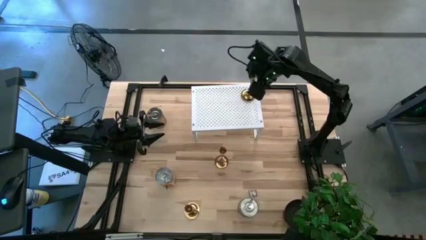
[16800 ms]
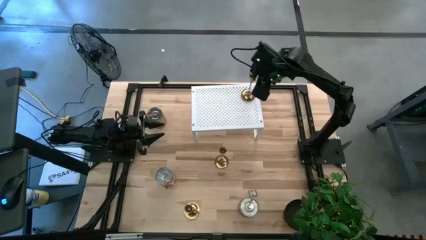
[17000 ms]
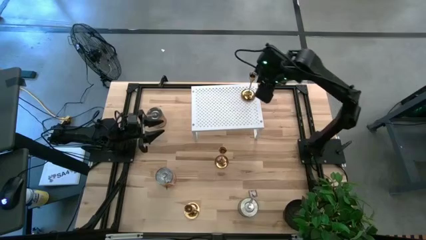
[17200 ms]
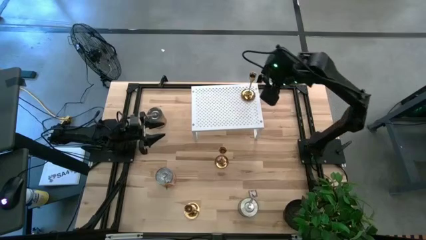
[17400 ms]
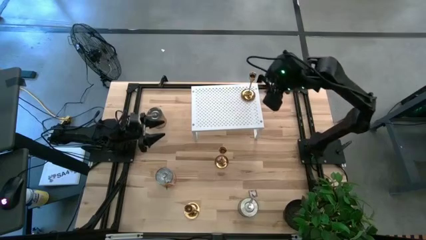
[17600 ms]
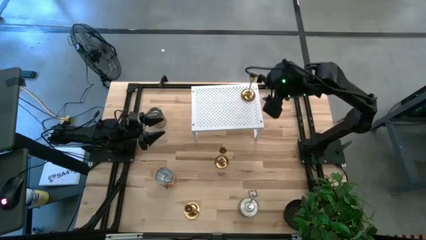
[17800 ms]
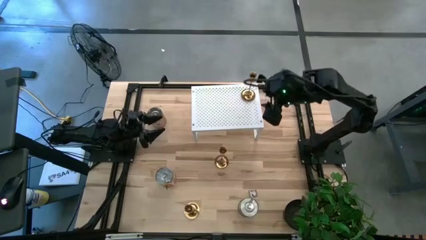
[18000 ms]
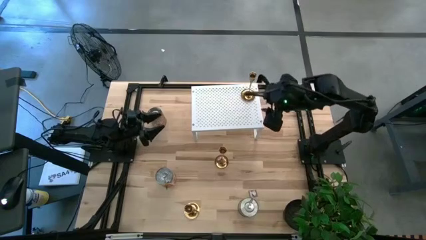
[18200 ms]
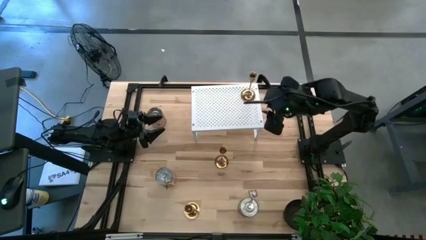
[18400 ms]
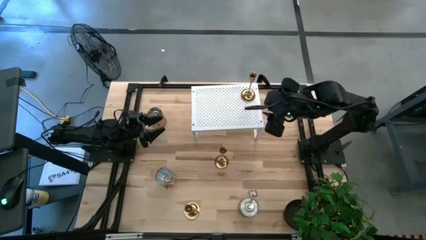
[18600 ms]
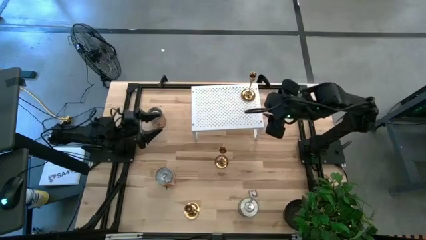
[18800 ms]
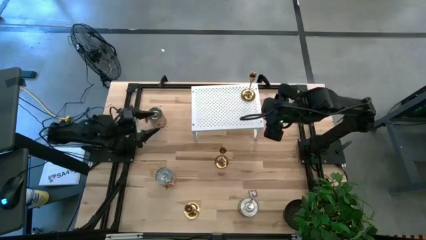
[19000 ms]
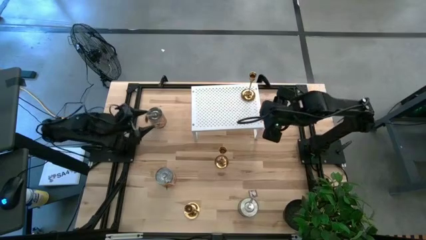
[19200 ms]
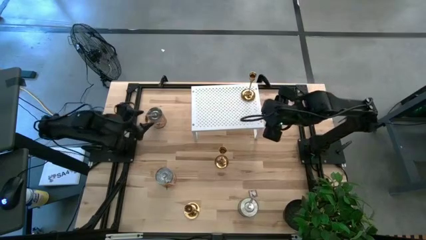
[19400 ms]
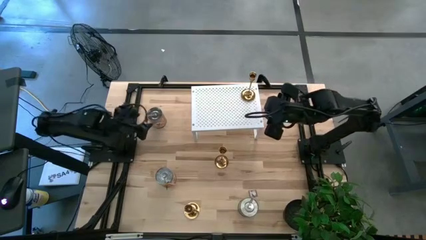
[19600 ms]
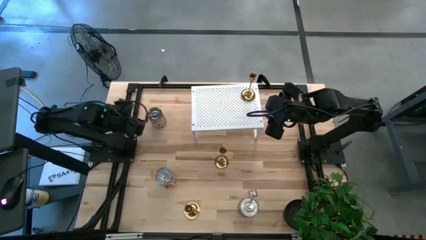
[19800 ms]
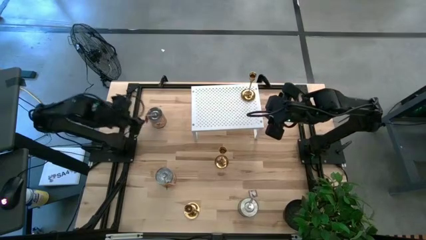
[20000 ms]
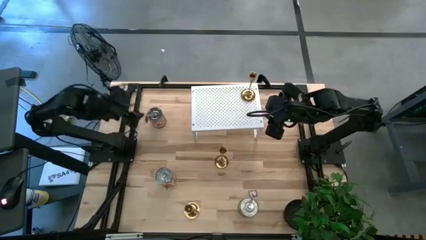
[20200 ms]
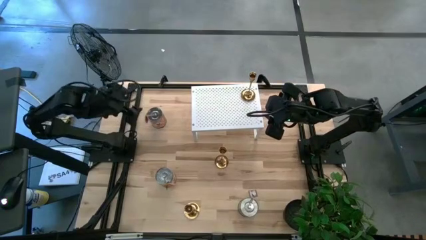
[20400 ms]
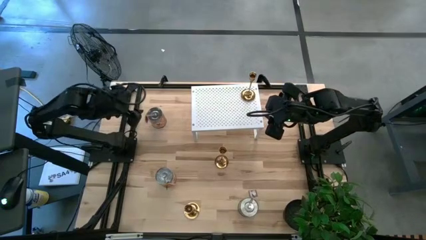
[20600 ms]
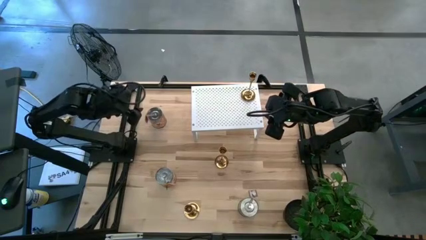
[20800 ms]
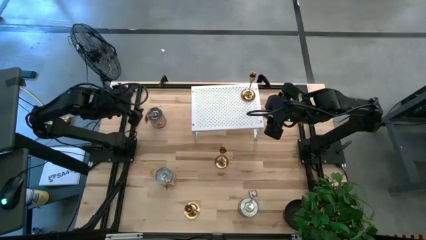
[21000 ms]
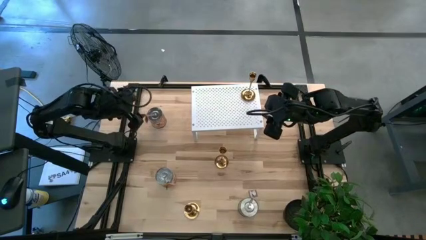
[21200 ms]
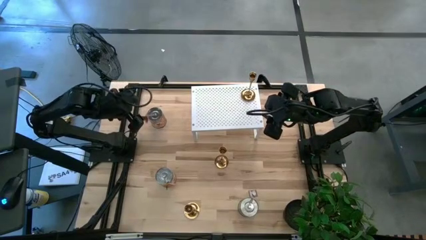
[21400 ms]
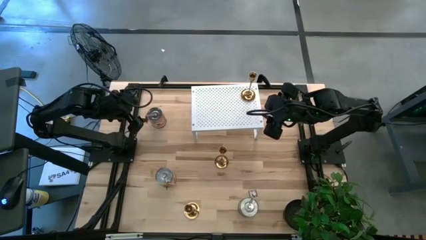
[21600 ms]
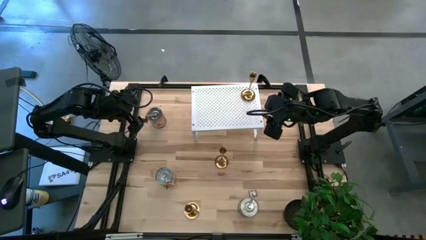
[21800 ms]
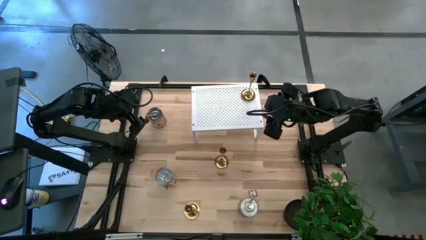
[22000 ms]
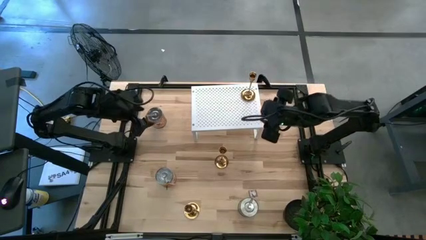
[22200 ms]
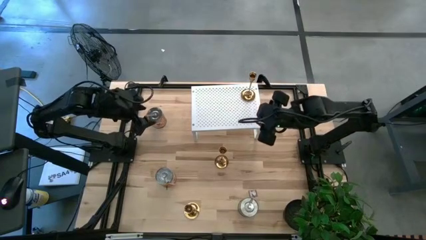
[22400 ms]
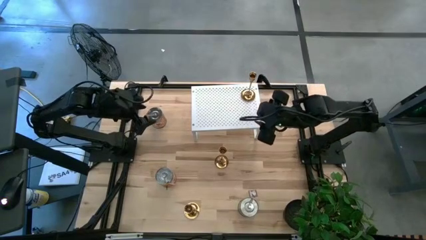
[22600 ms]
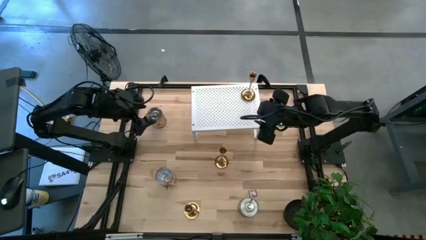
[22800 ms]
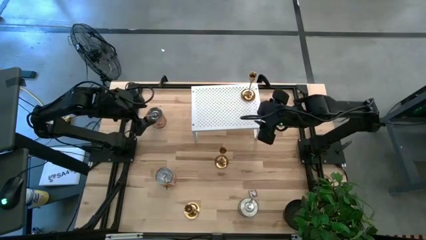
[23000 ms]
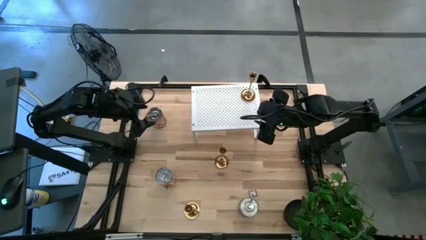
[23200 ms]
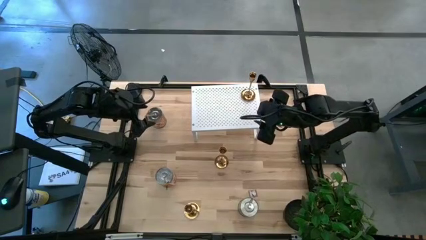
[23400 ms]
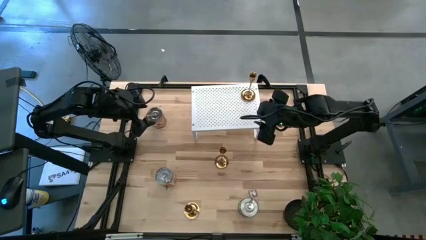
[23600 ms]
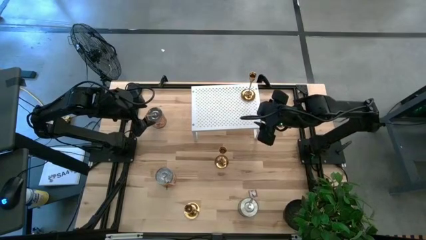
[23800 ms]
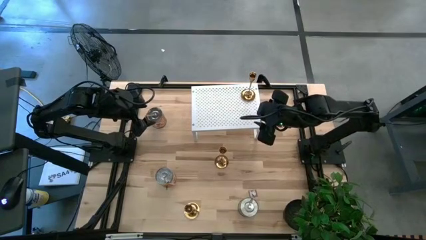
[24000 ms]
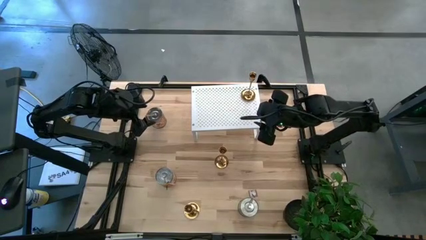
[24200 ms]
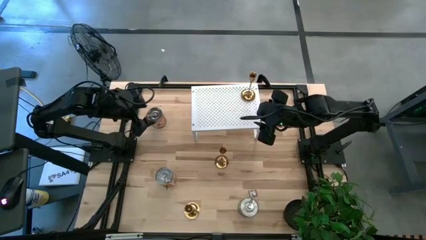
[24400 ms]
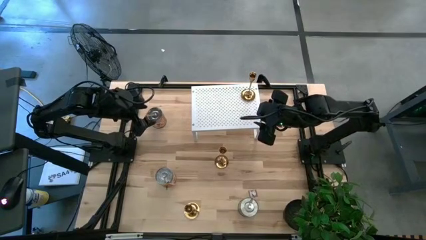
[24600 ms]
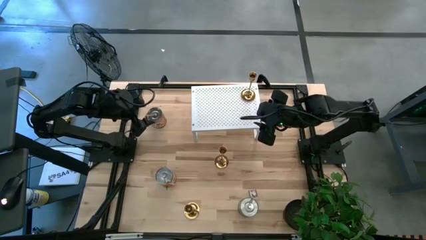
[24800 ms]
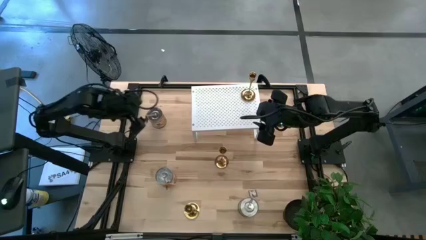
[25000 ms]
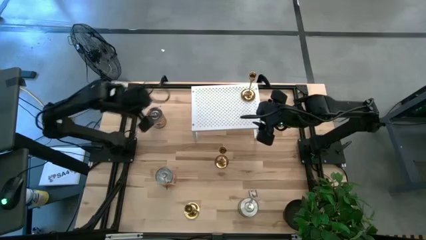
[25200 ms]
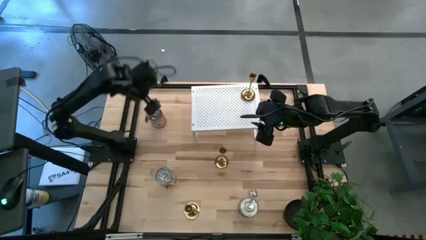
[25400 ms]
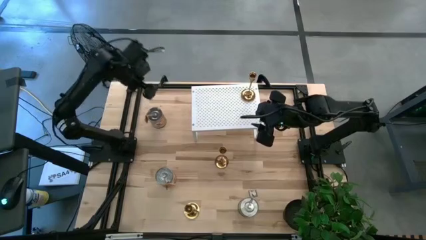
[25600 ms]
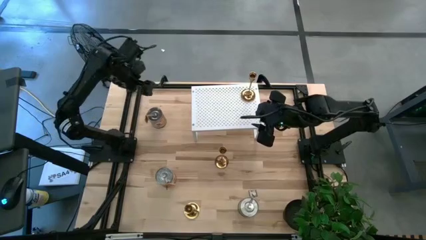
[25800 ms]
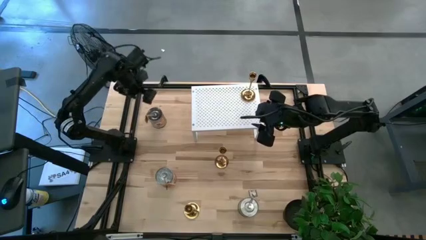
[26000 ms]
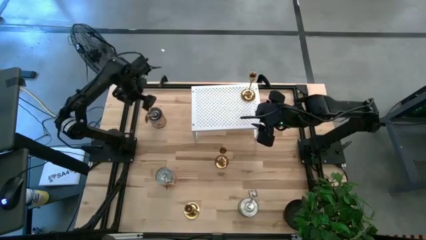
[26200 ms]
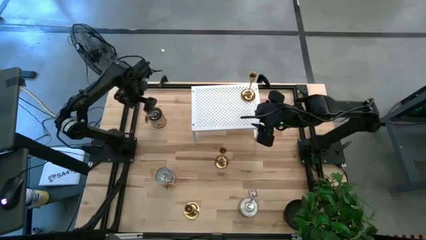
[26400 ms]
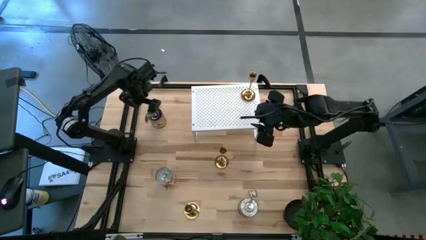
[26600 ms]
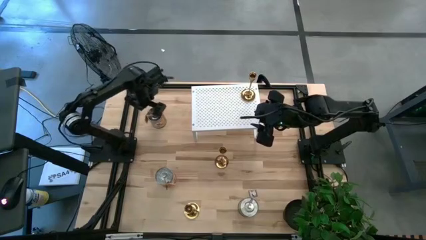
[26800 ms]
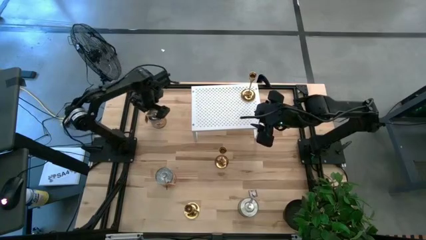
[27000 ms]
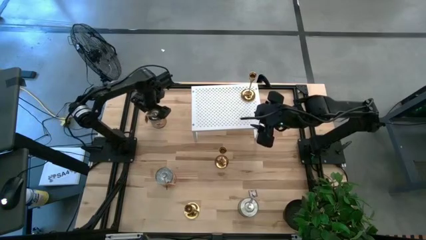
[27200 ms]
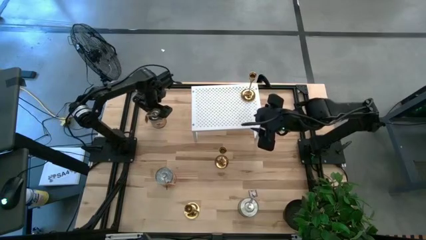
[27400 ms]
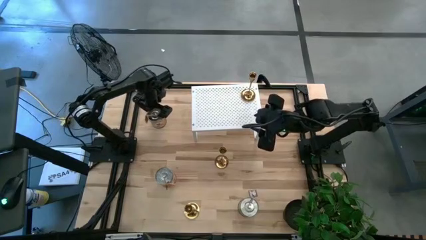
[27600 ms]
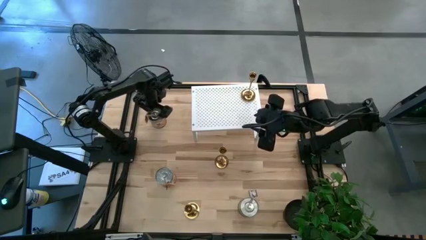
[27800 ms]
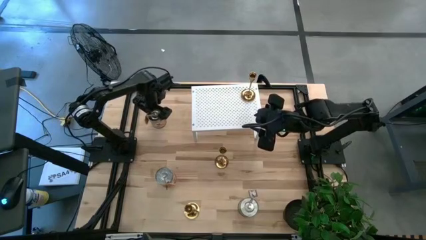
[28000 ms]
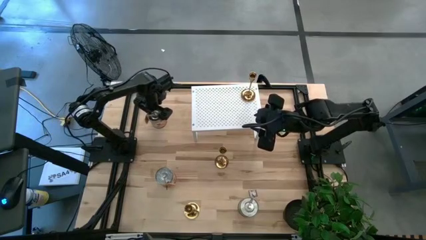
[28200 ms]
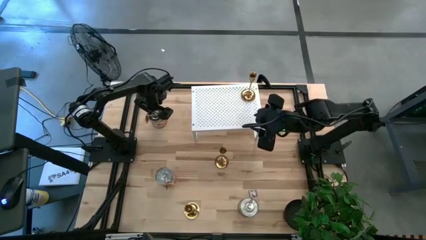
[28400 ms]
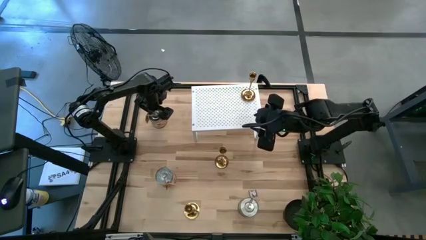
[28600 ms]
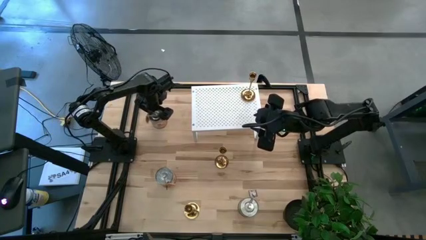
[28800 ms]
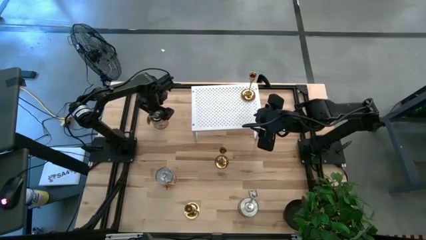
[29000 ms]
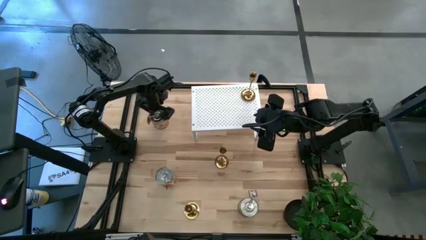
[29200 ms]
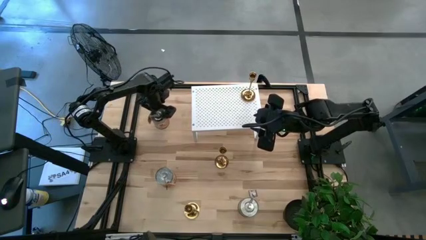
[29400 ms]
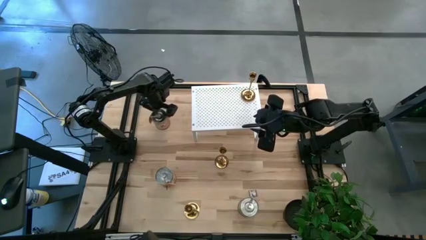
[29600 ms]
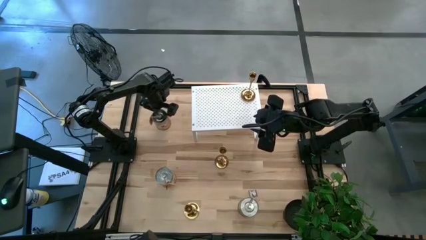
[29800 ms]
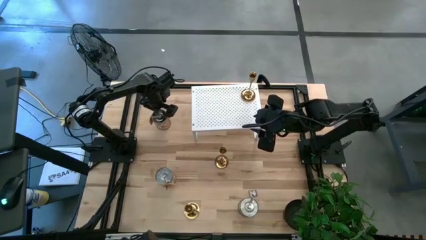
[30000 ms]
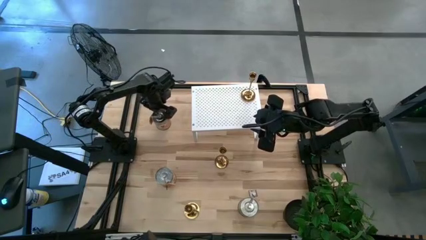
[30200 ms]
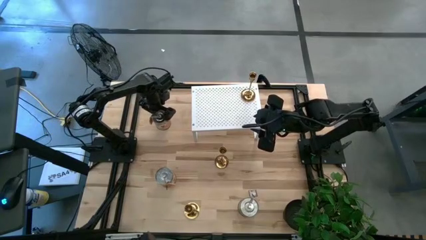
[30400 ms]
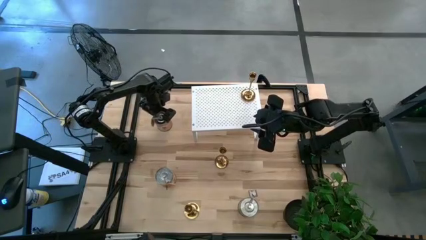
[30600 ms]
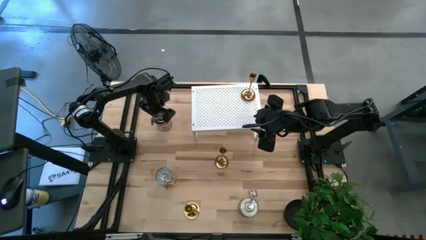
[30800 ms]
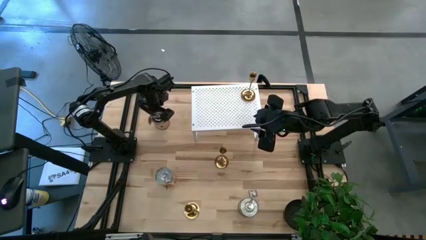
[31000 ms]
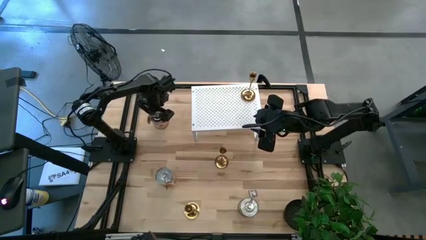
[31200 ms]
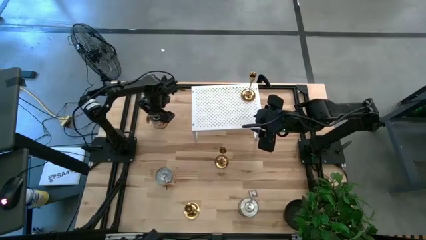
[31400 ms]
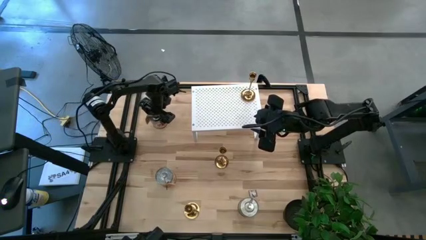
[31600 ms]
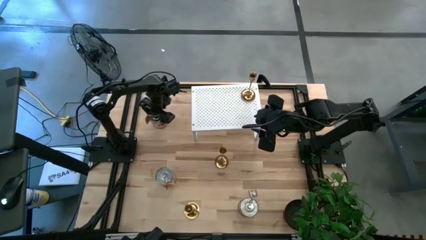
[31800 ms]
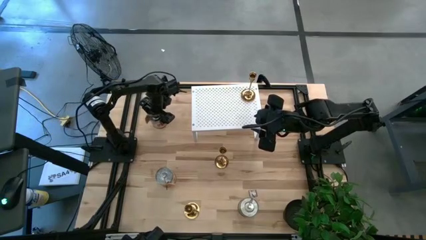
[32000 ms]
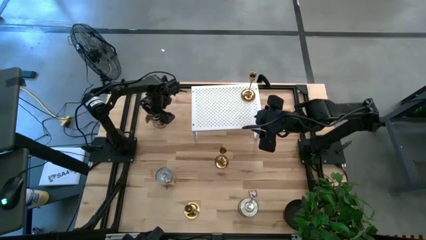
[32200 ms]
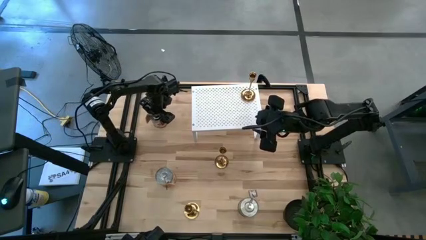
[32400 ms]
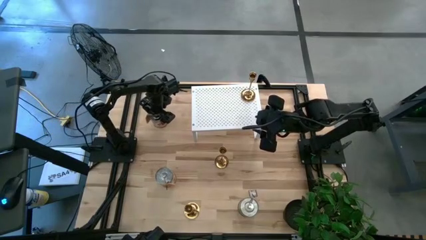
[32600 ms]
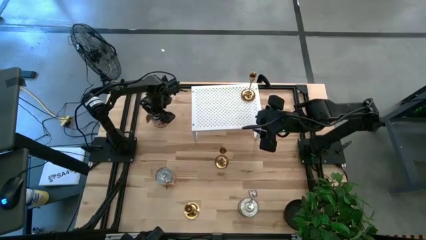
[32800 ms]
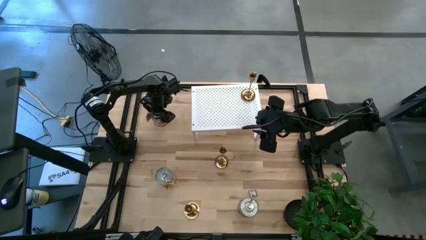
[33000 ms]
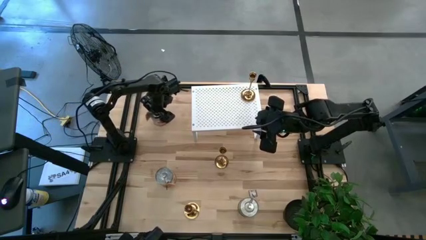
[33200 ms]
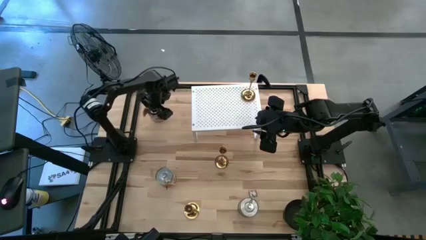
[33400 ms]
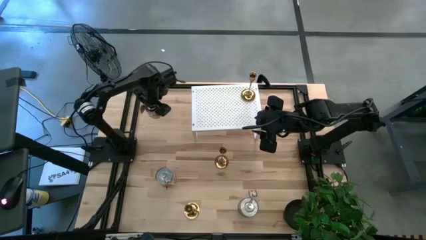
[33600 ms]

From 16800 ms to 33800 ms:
Task: Pick & Place candle stick holders
Put the top silver candle on the shelf aligned with the gold candle holder
